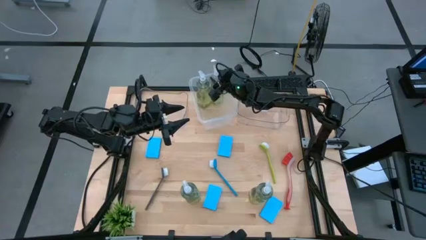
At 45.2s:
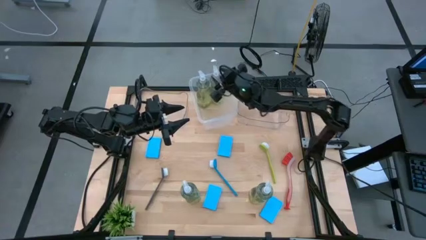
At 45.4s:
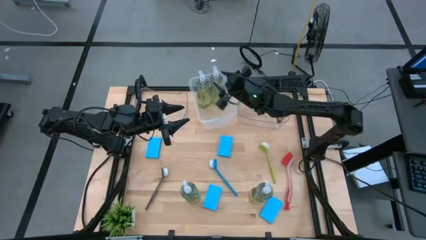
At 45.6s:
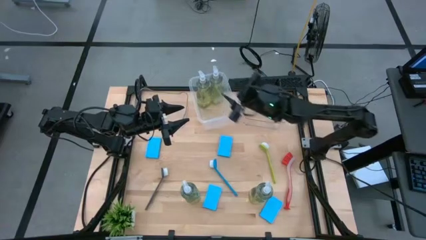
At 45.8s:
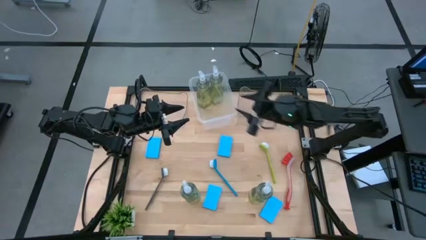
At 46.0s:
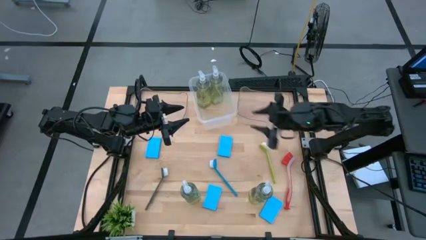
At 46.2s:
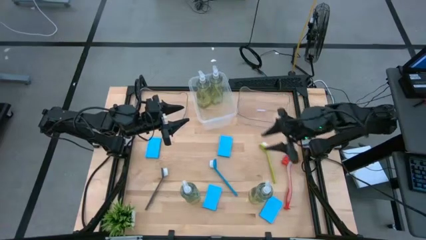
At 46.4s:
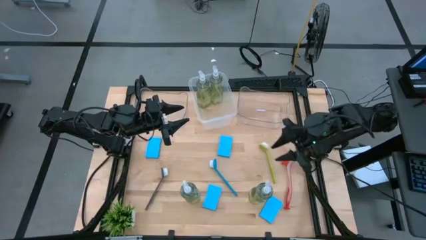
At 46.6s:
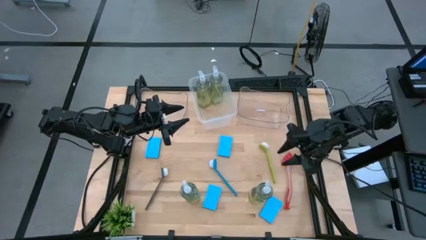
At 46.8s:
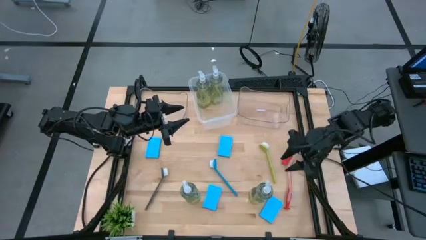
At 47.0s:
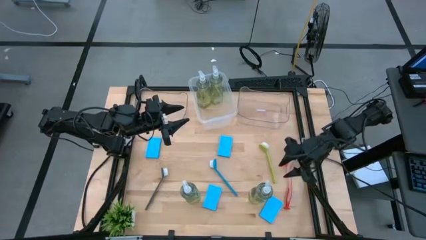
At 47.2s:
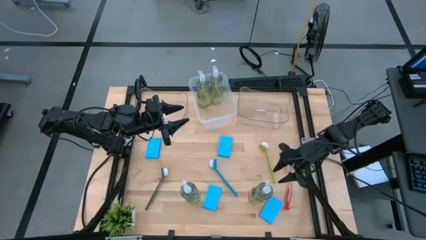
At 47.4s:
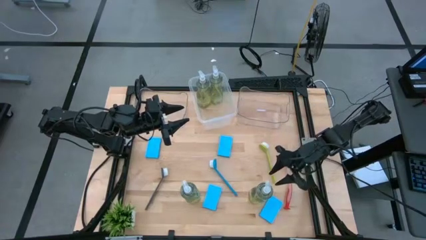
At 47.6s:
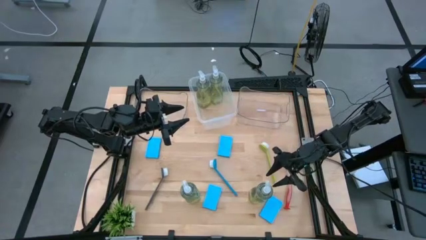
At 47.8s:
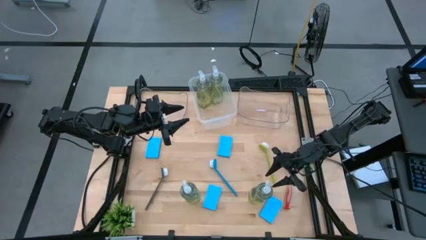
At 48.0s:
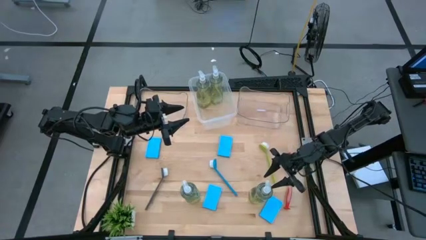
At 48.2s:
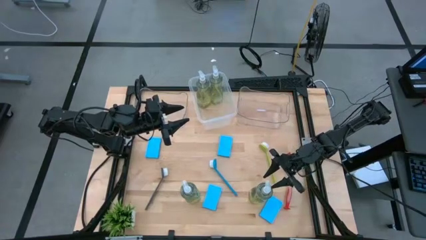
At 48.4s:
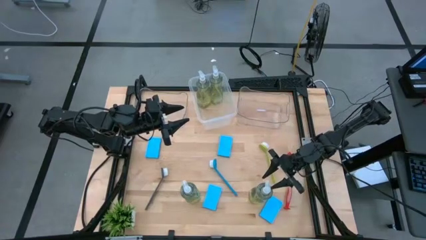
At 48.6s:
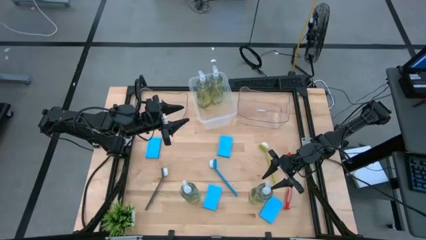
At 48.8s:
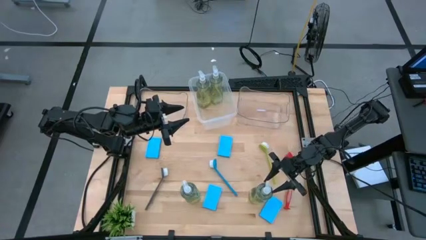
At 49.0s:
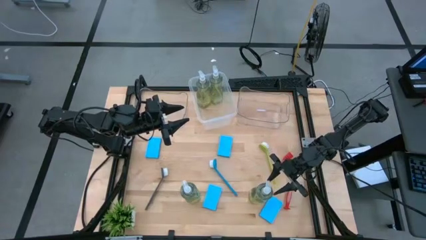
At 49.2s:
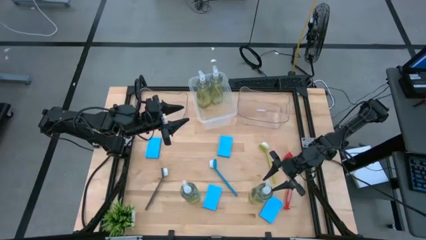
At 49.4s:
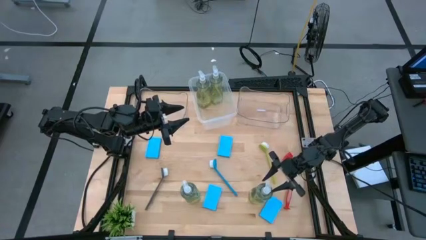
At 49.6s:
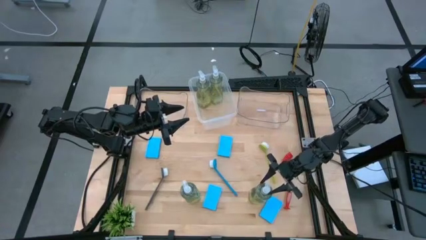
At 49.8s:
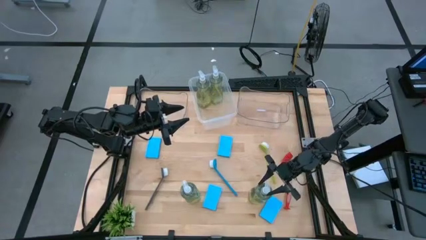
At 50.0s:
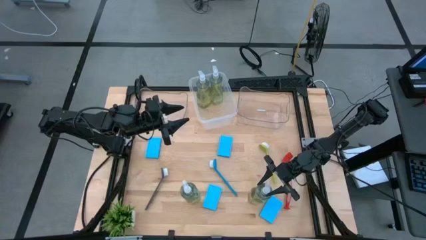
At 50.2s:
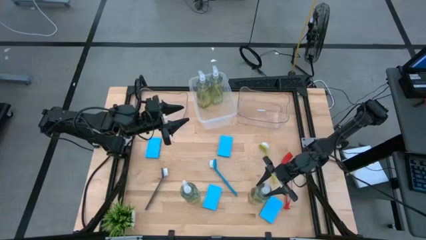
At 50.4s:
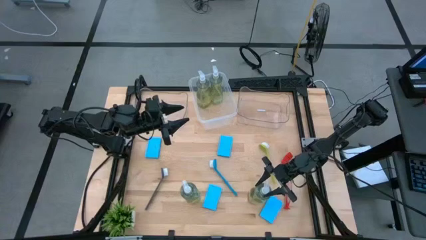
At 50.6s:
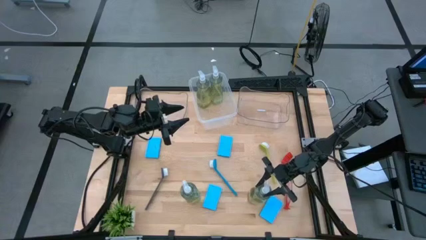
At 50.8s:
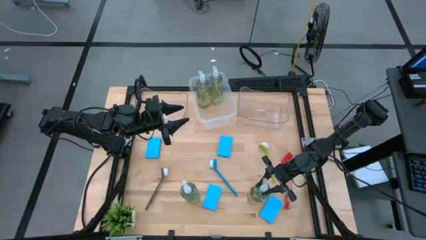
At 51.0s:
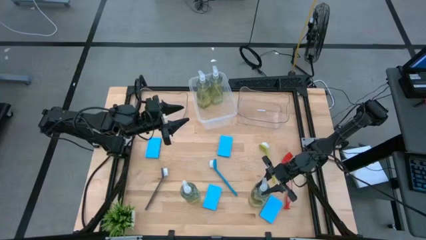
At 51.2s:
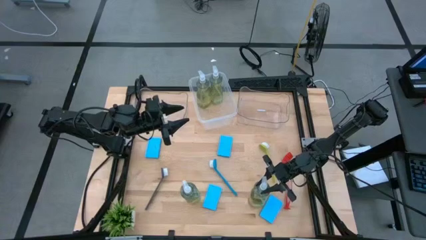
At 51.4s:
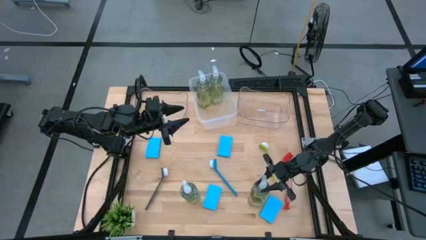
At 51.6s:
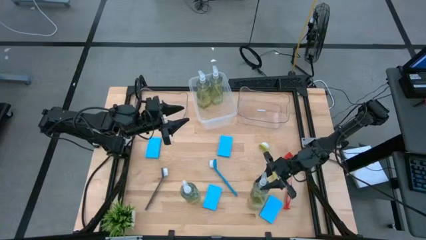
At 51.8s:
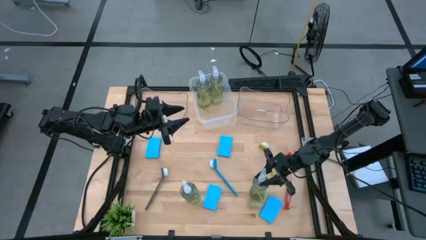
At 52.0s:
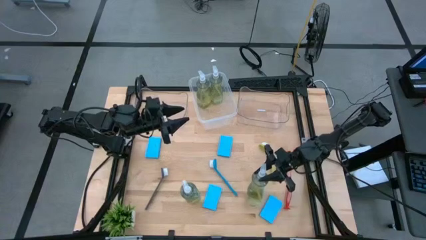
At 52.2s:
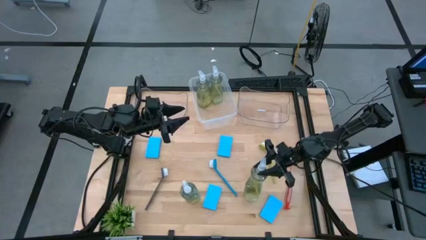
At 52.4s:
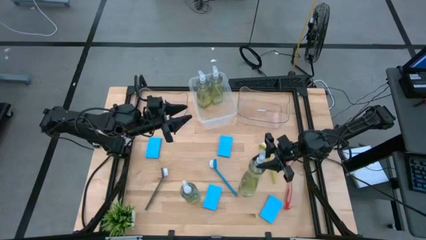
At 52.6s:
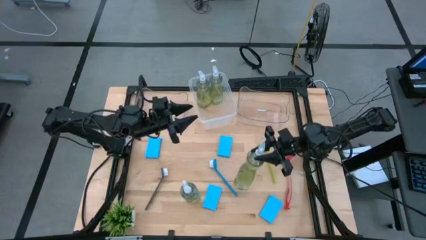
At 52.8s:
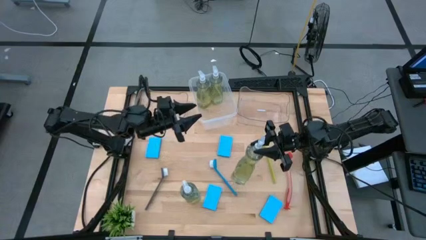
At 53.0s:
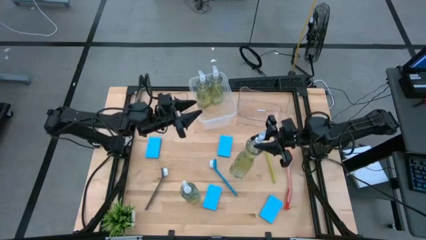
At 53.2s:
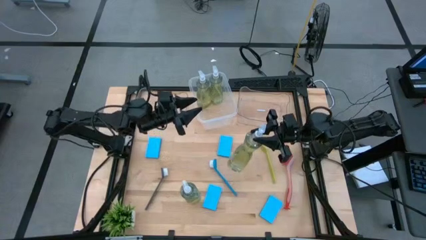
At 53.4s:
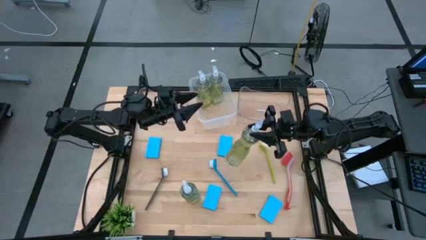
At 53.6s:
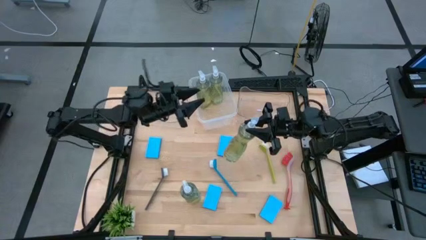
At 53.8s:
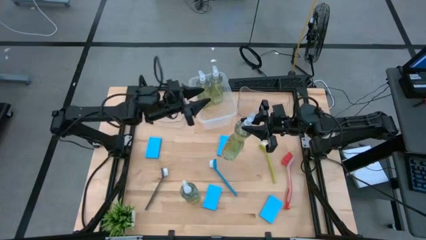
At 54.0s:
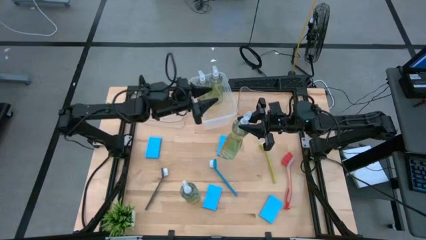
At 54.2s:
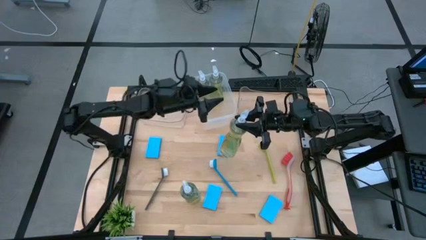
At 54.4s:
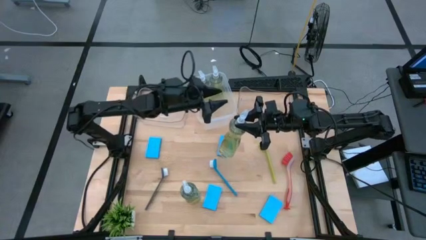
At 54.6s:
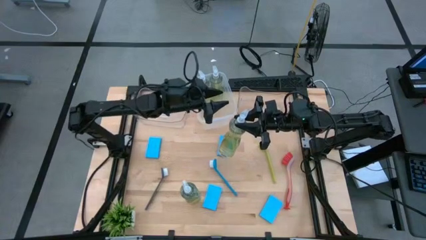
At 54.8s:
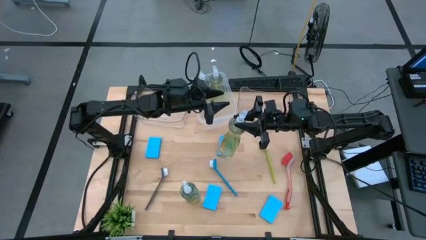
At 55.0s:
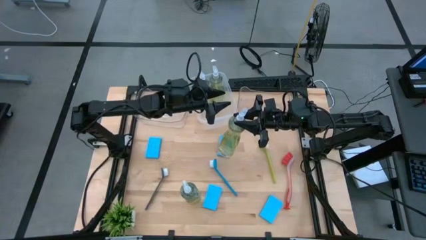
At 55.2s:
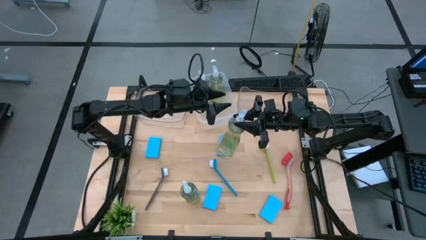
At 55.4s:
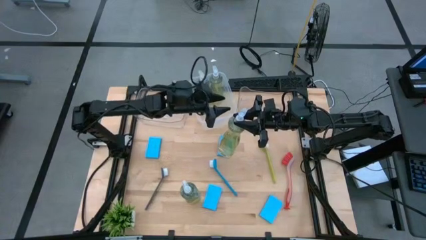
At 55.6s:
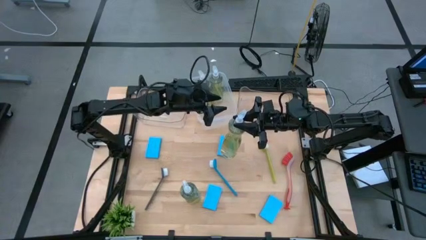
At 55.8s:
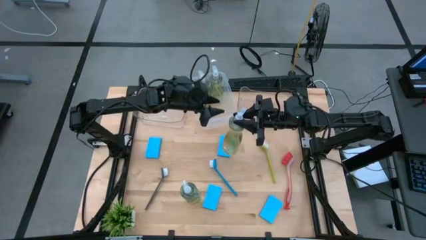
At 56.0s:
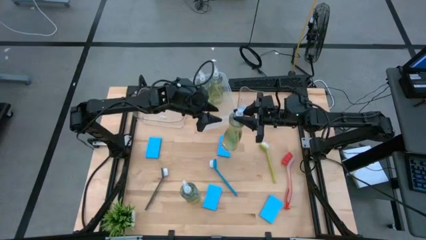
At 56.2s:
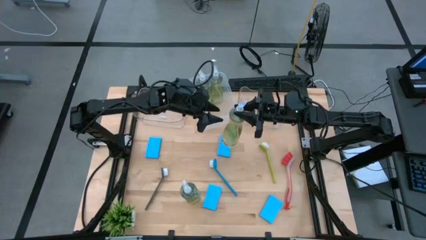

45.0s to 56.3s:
Task: Pick & Place Kitchen Sink Supplies
Put the dish soap into the white bin
